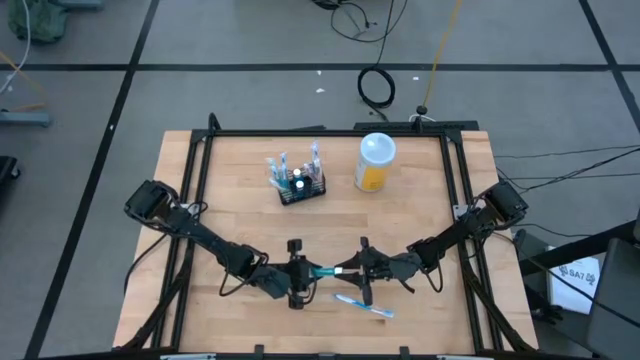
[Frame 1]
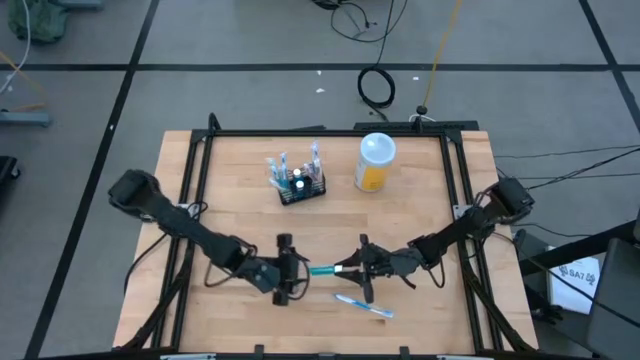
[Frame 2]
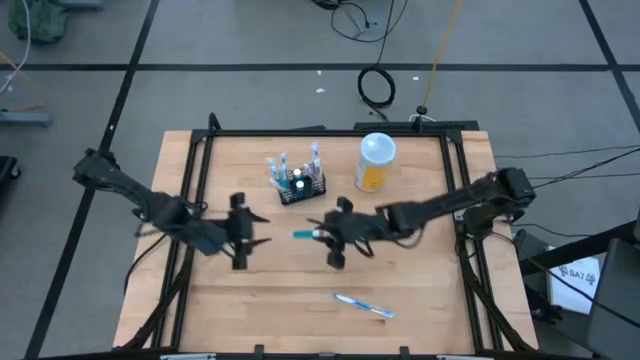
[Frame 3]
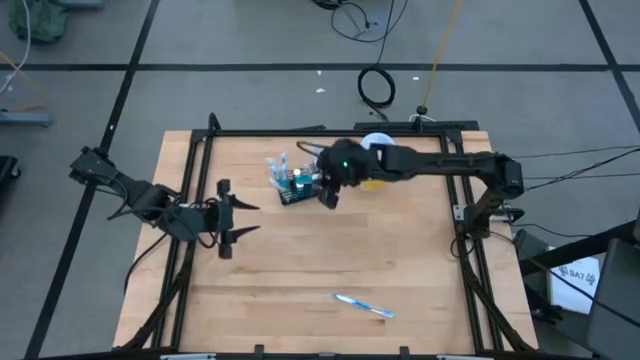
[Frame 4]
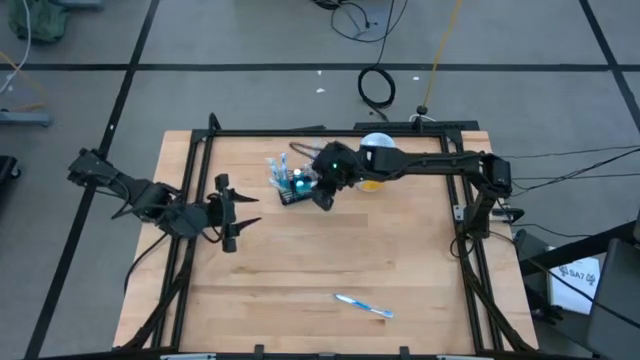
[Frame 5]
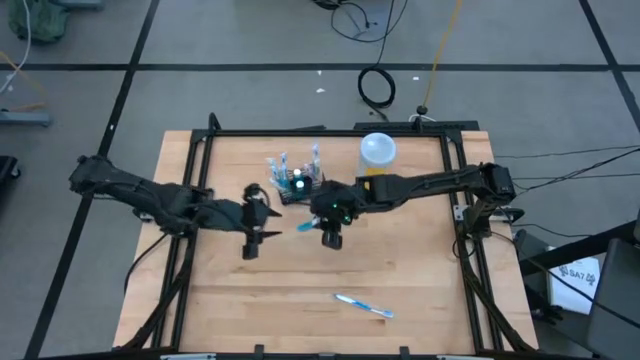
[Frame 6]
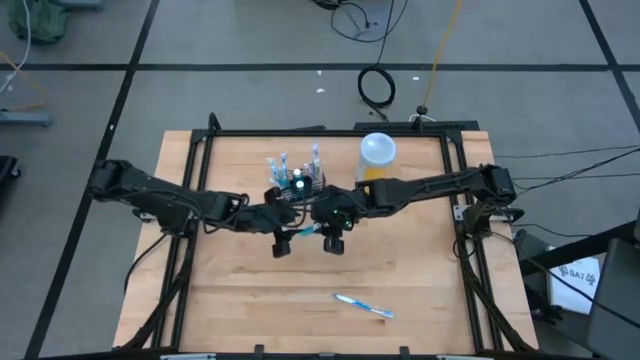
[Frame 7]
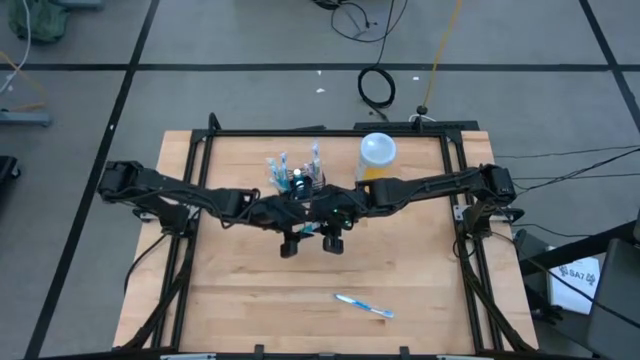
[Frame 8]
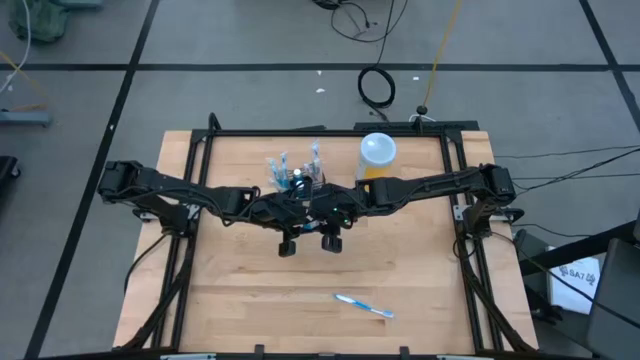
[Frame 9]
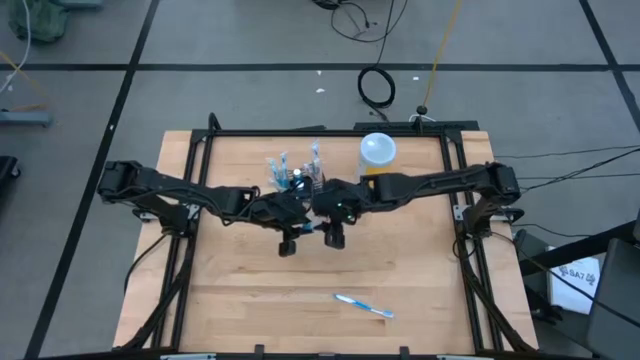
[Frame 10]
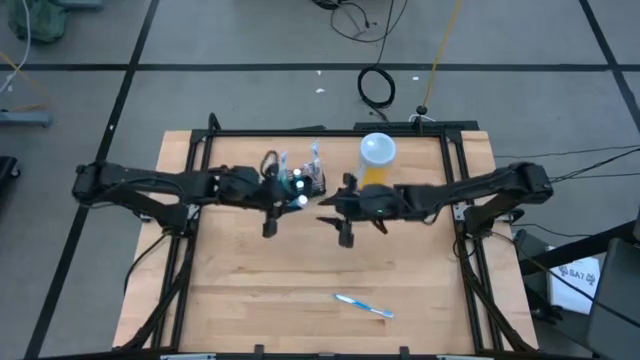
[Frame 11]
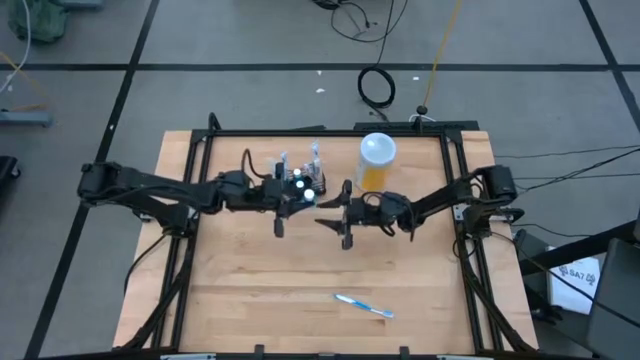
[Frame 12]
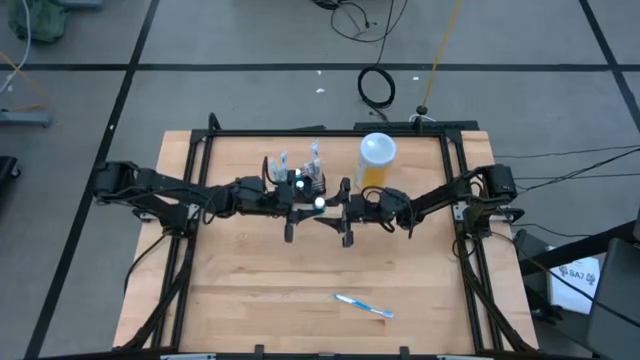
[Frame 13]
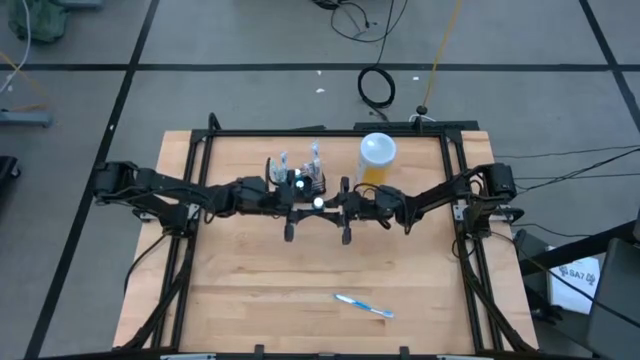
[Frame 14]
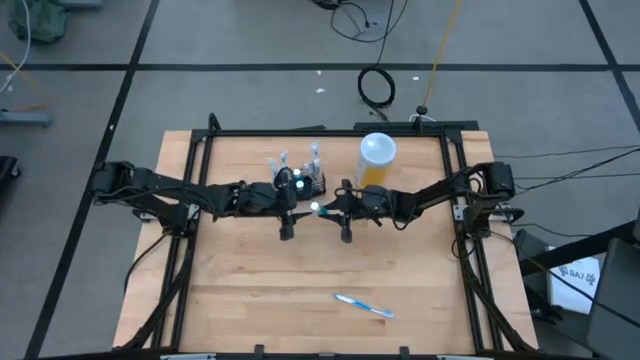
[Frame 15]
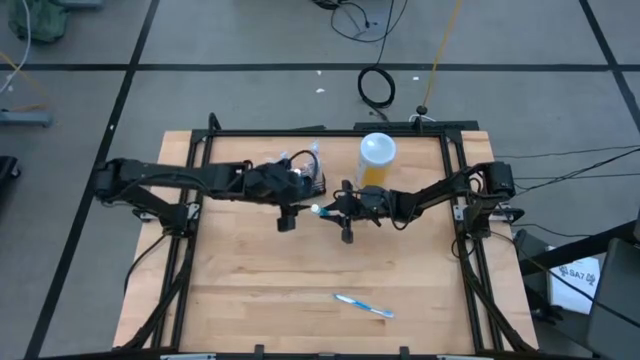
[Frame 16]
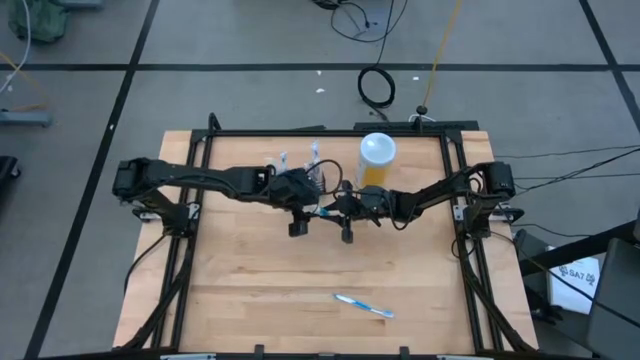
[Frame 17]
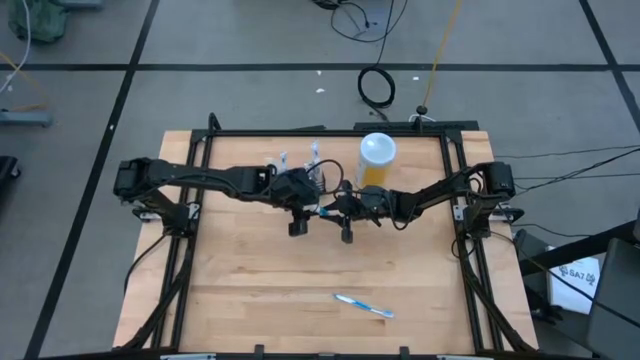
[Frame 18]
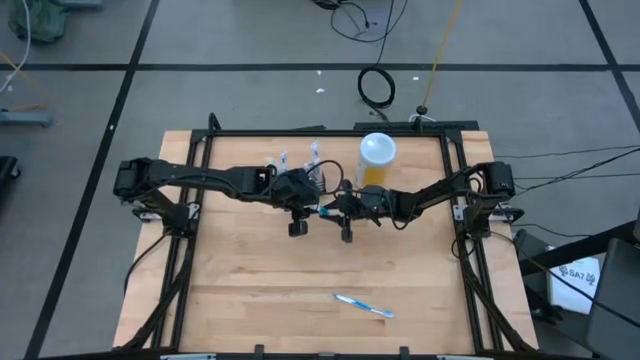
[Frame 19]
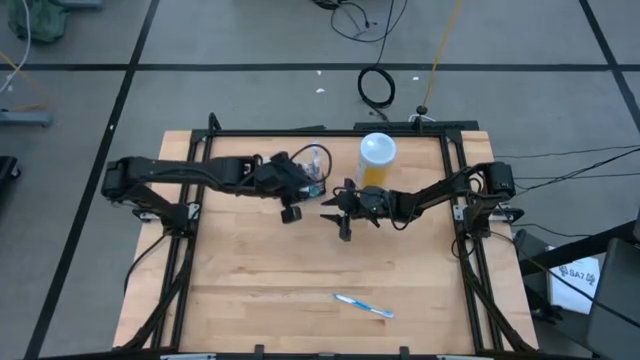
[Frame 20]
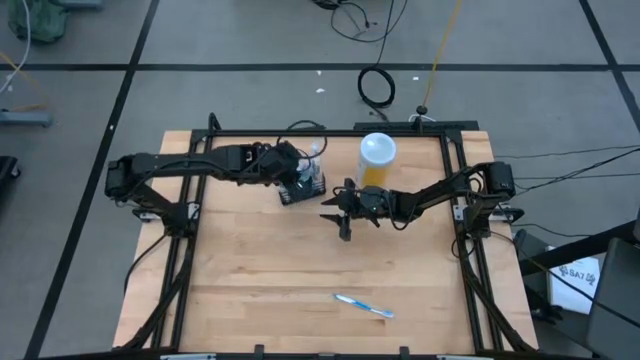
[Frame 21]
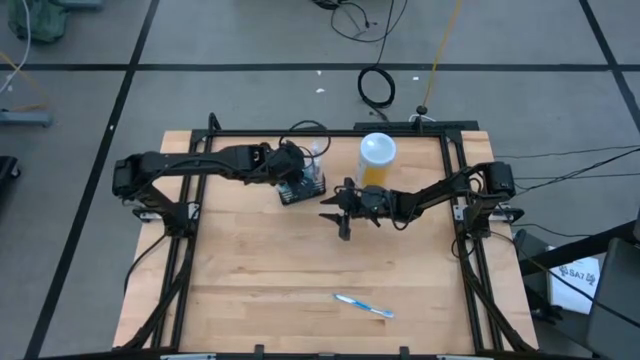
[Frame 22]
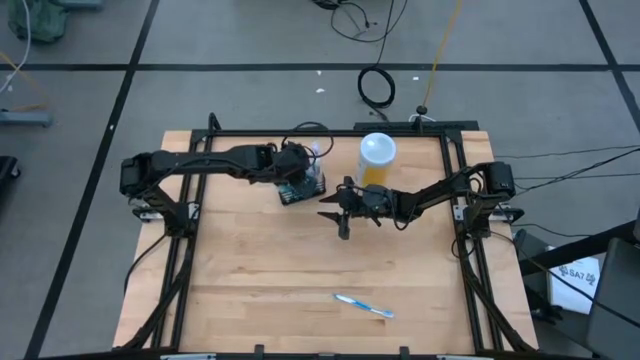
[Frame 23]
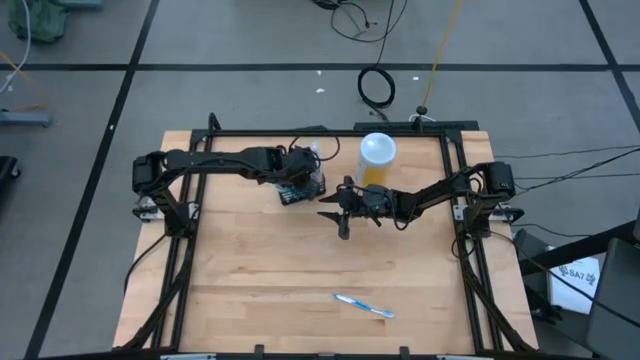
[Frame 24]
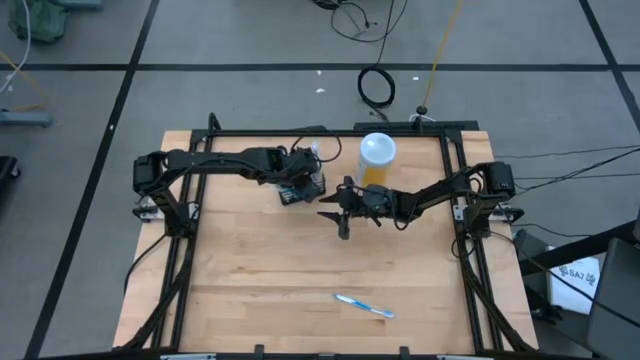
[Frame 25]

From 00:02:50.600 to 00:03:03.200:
Task: Pick & Place toothbrushing station
Put the blue mouthwash into the black mesh organizer

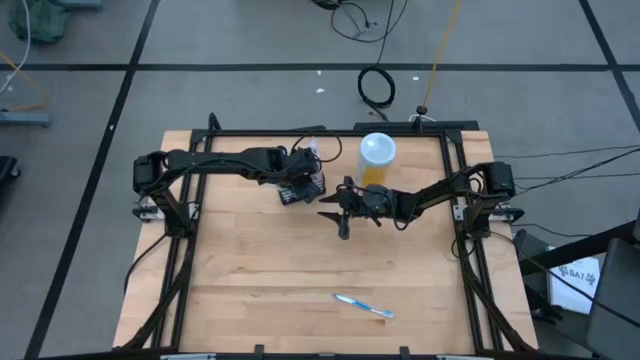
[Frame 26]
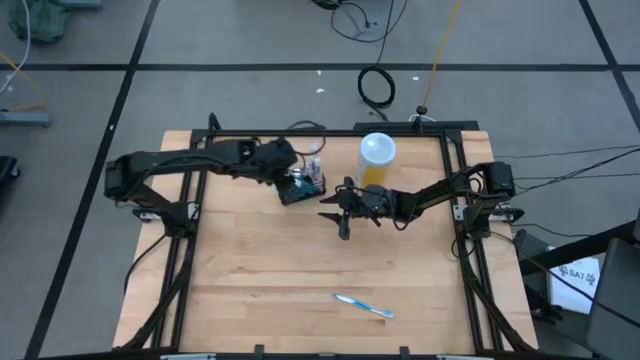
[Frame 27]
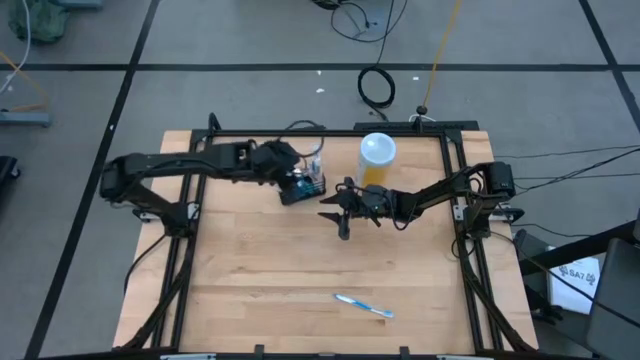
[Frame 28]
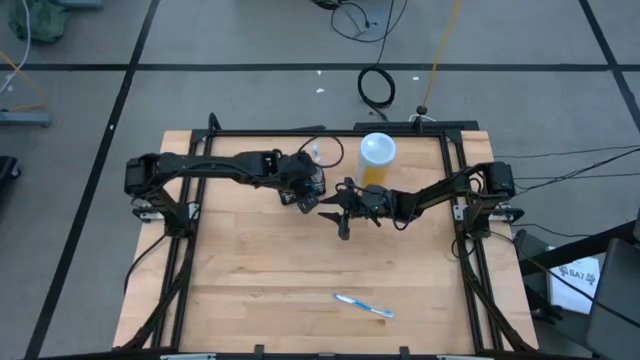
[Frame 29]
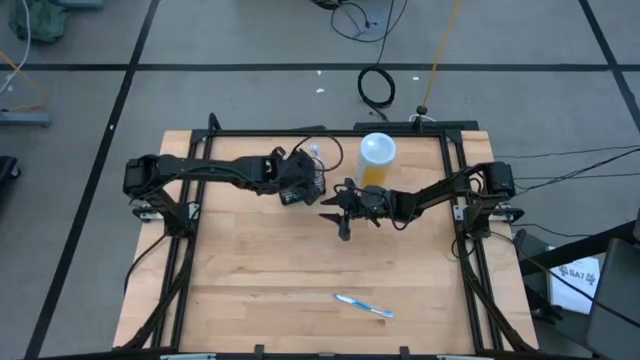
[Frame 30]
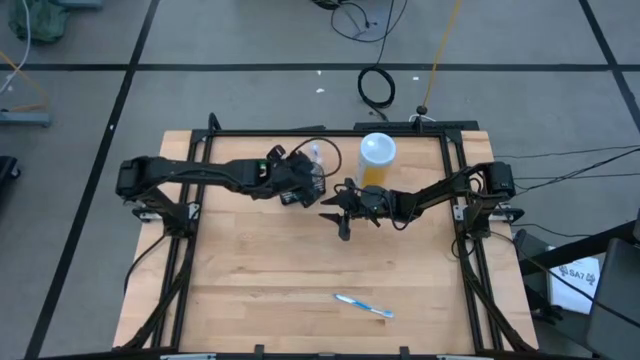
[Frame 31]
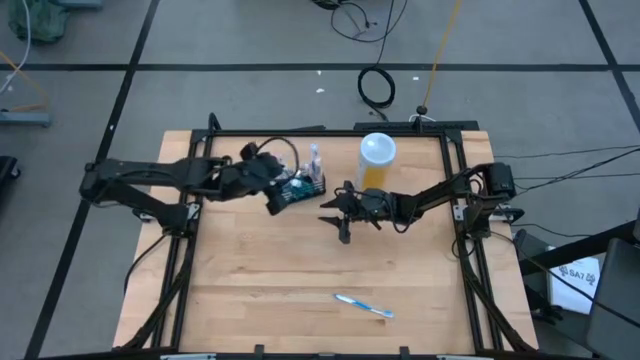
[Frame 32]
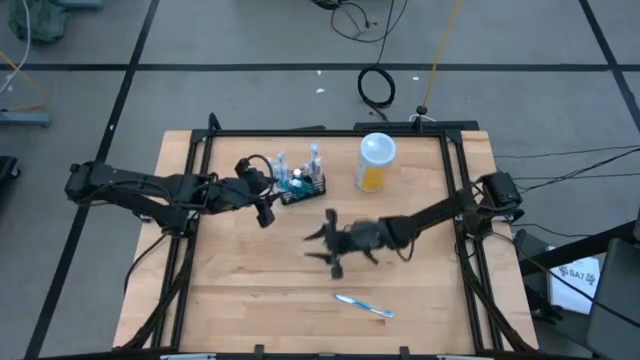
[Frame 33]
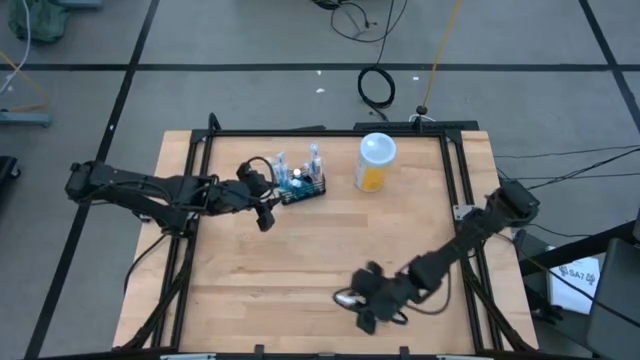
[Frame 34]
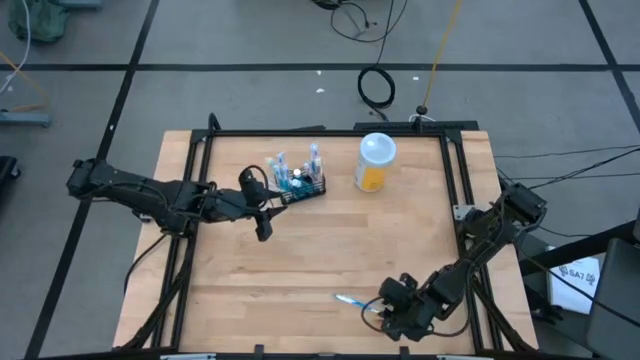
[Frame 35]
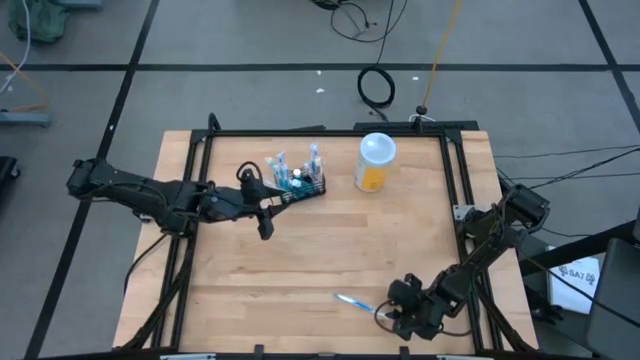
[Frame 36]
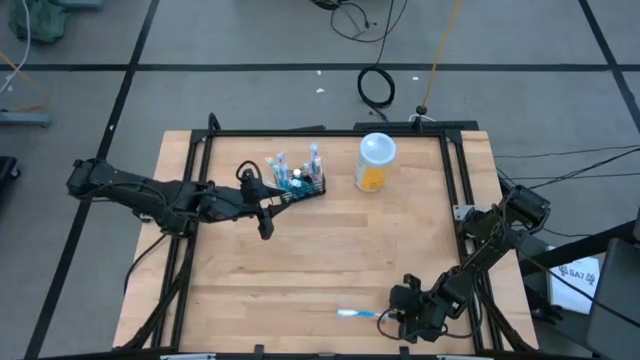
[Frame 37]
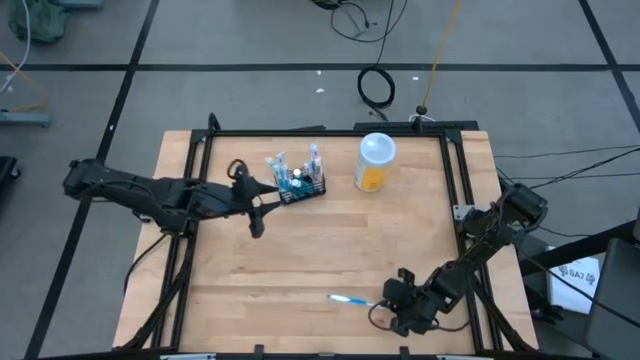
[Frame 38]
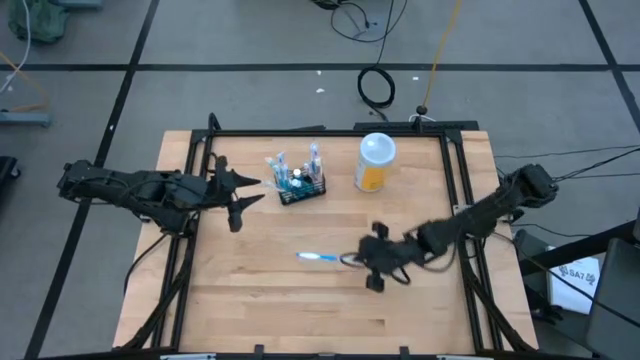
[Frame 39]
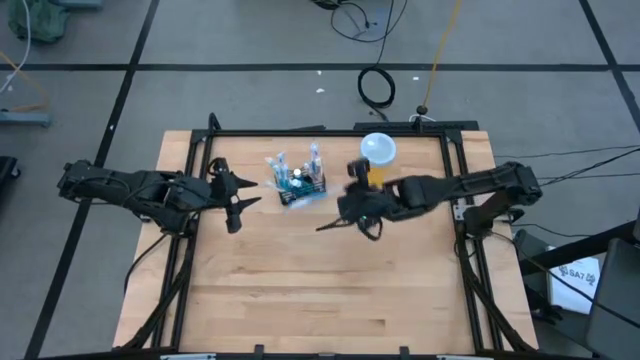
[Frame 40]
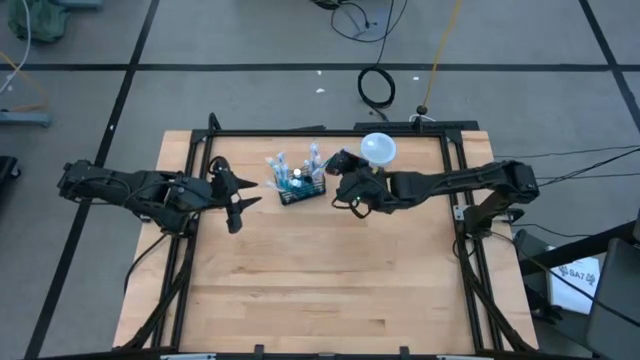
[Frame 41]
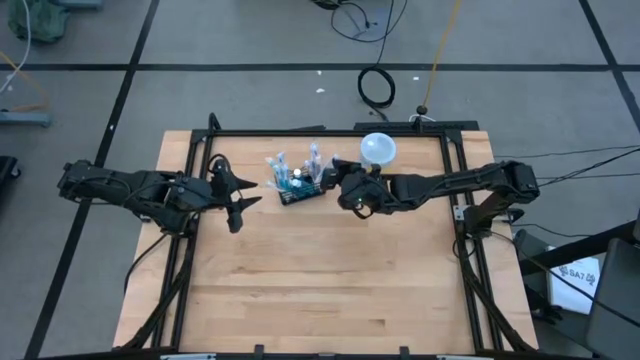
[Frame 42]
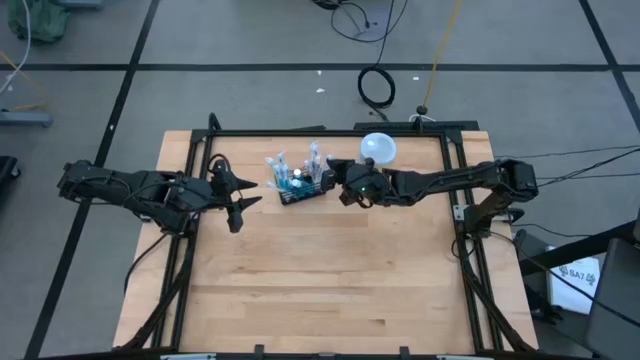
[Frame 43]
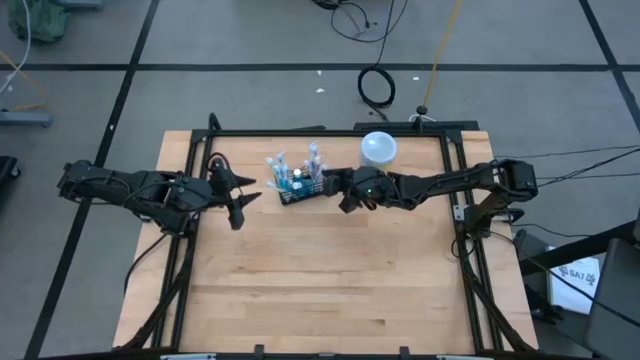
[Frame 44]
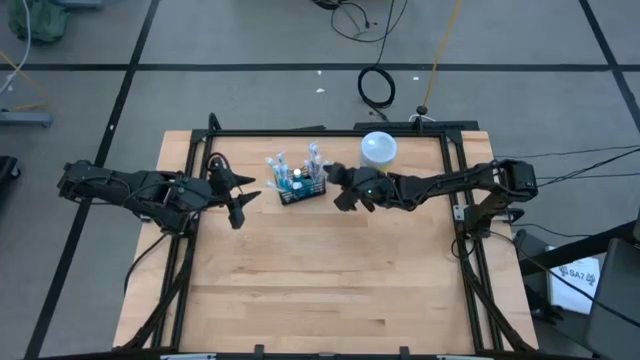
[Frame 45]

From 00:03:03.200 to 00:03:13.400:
Put the blue toothbrush into the black mesh organizer
